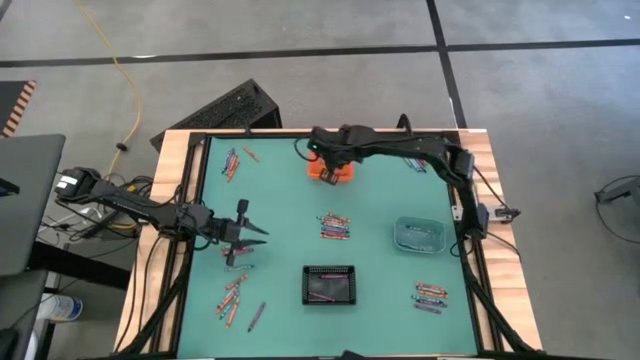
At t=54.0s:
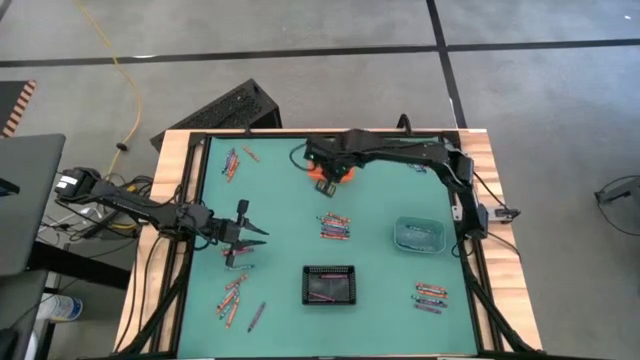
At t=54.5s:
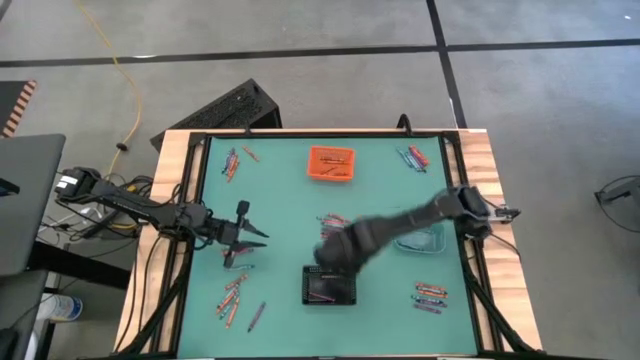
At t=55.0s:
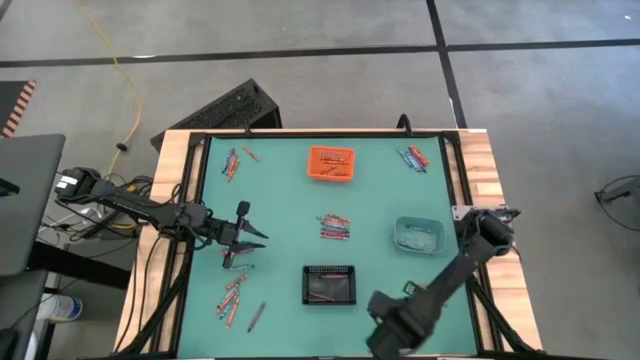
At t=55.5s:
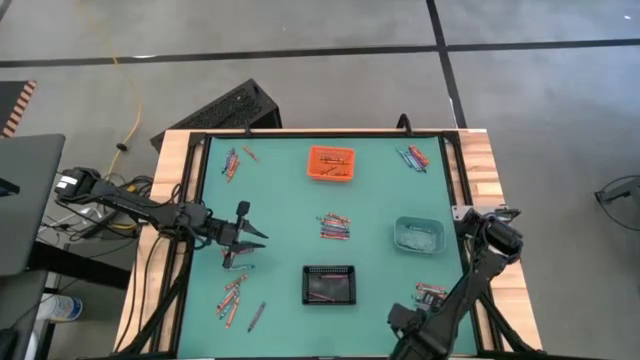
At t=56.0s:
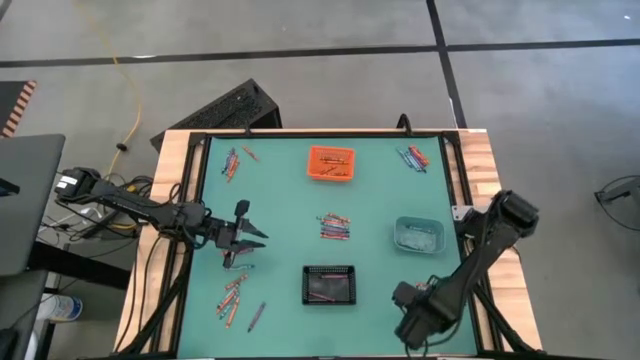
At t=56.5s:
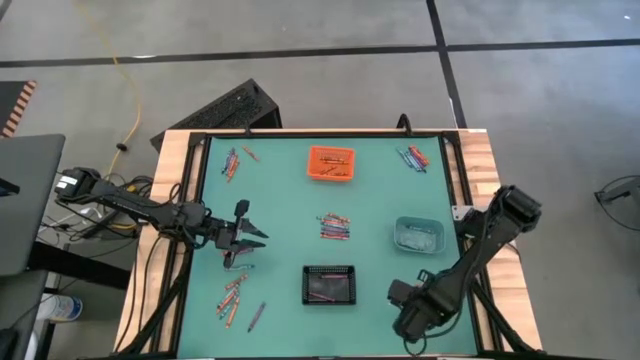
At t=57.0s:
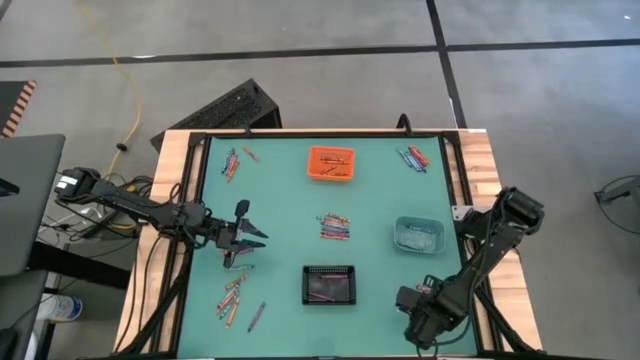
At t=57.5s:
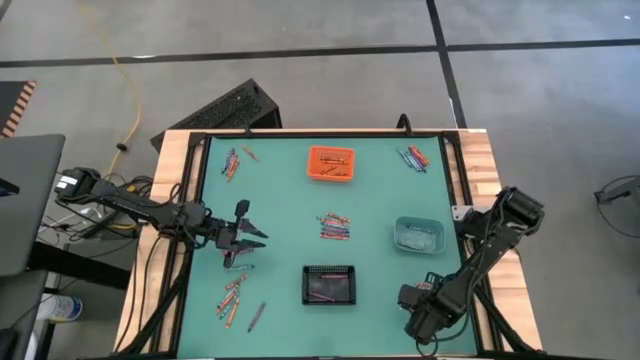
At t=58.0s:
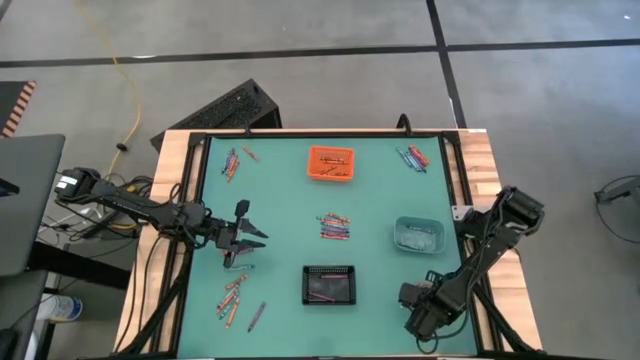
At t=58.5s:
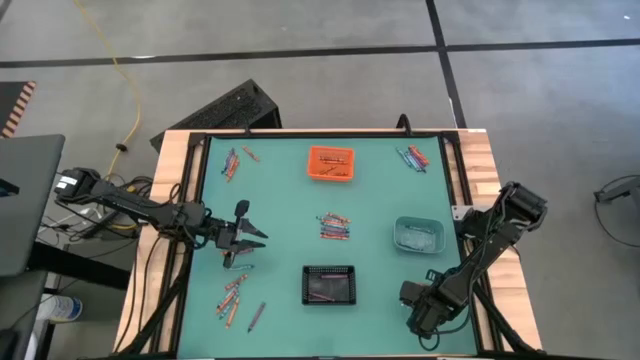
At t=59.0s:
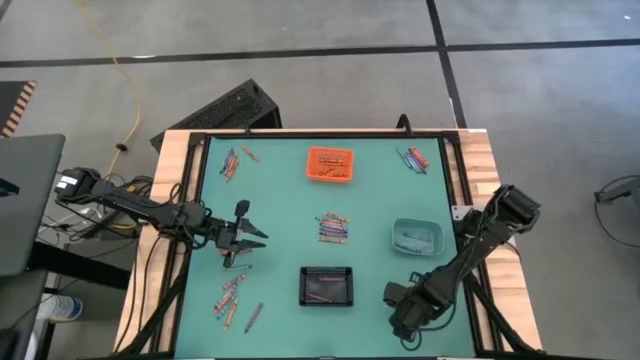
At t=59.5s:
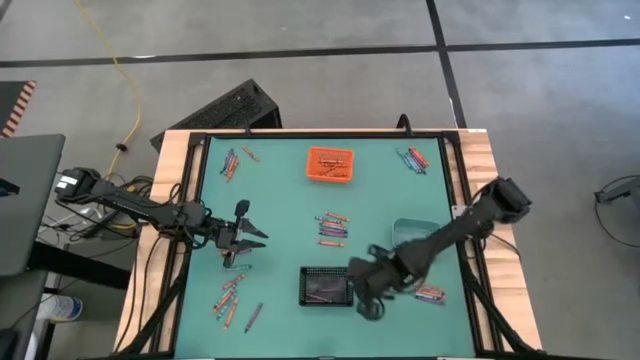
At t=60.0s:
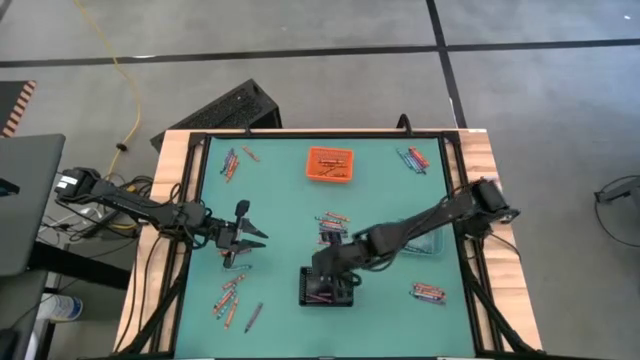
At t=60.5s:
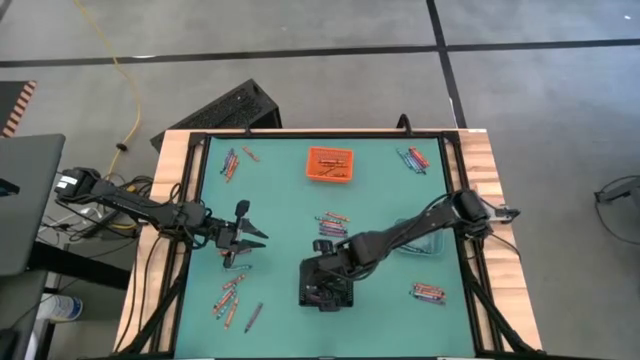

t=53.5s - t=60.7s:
Task: Sort crayons
Put the purple crayon into the black bin

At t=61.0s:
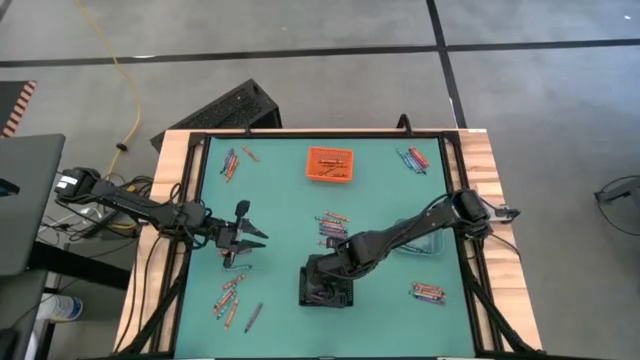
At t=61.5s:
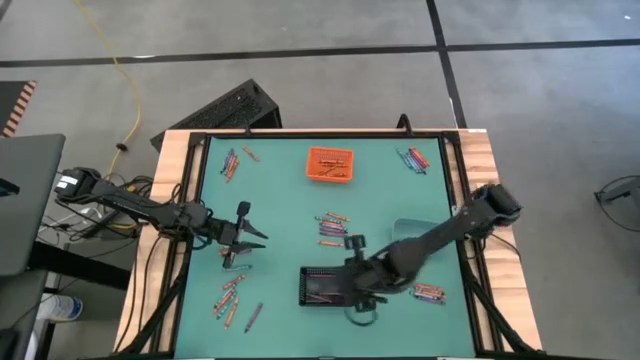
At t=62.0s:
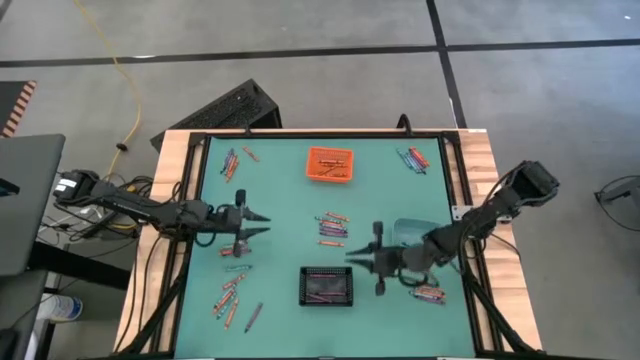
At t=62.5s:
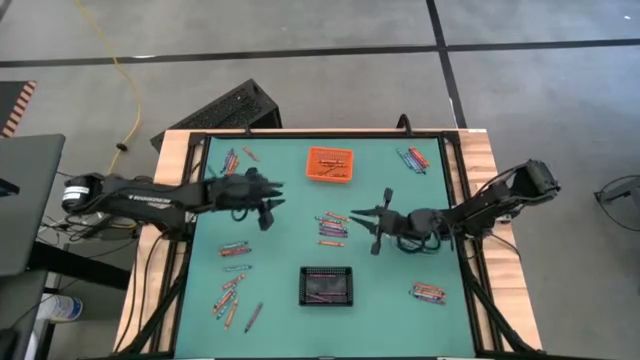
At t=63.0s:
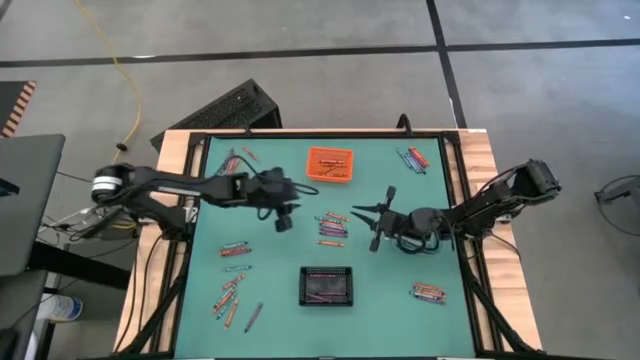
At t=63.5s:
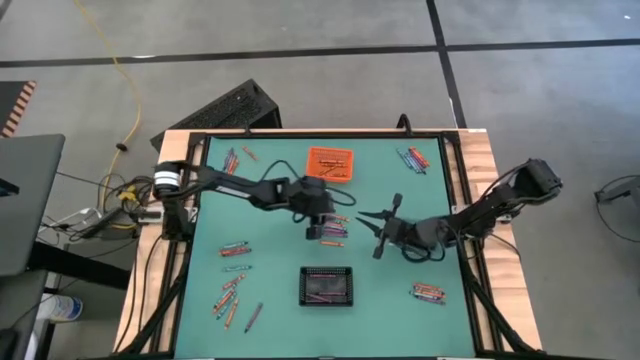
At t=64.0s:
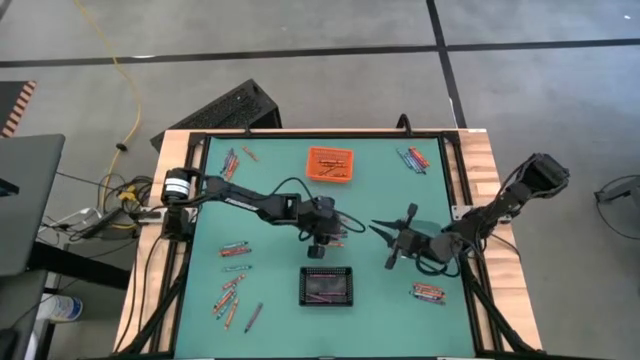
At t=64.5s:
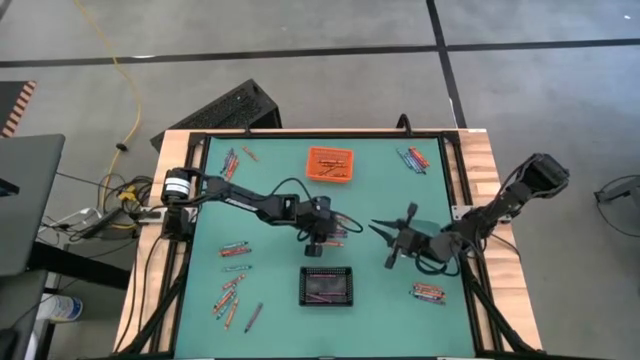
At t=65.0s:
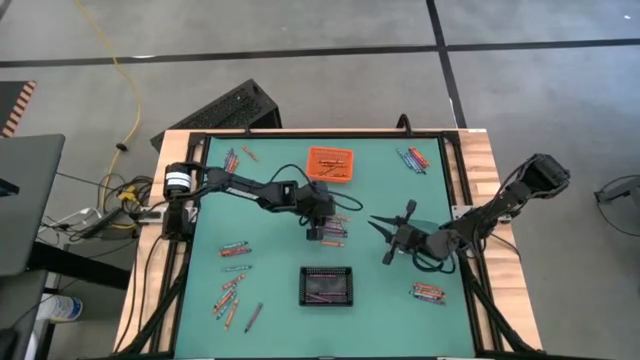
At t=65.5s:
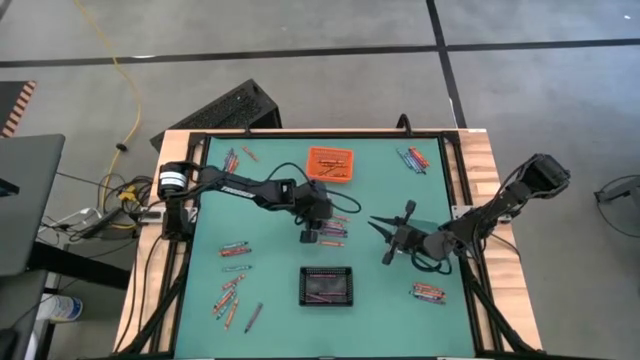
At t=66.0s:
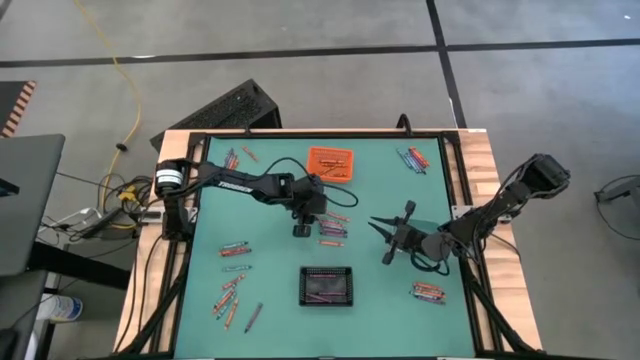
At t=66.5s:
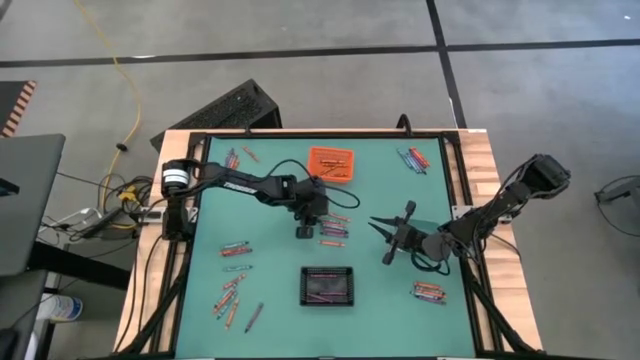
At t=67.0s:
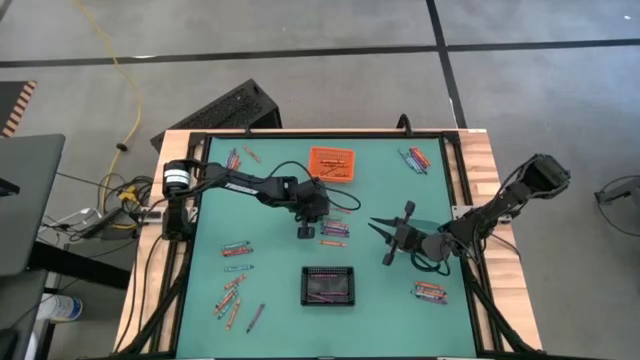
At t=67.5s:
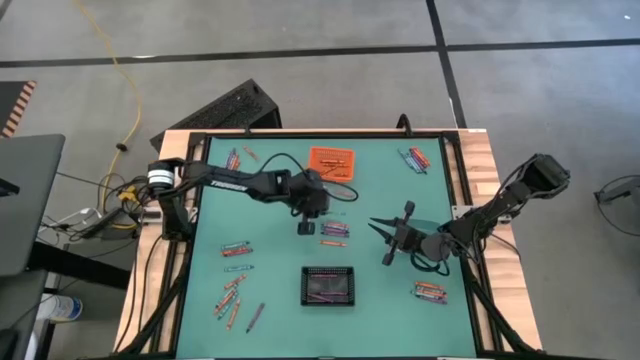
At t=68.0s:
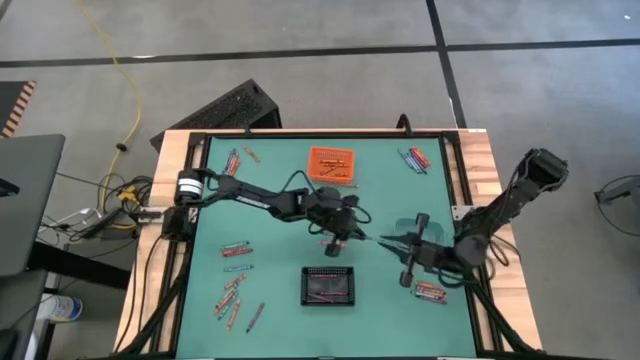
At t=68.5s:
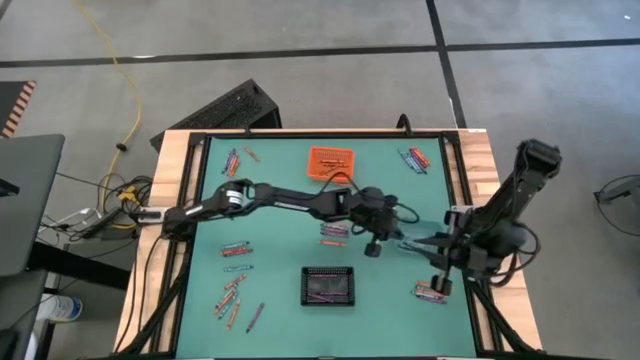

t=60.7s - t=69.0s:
Put the blue crayon into the blue bin

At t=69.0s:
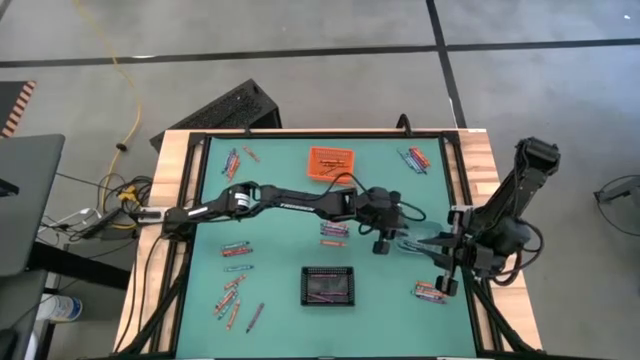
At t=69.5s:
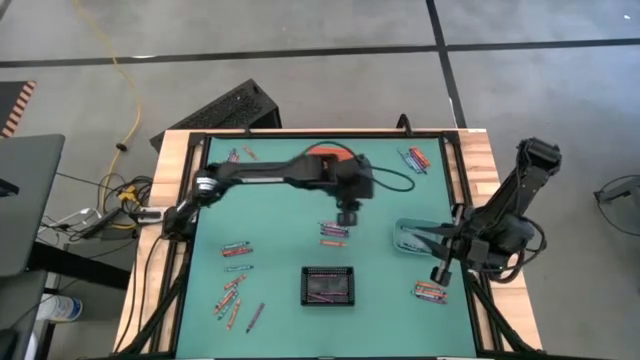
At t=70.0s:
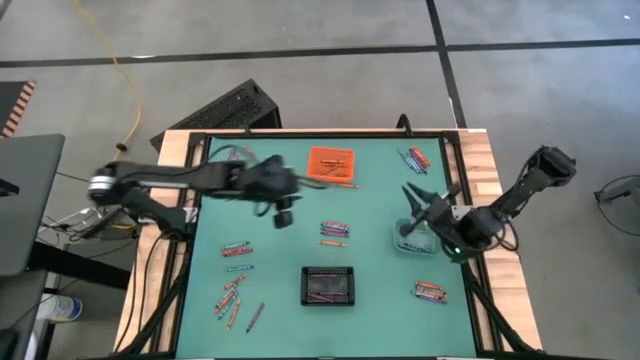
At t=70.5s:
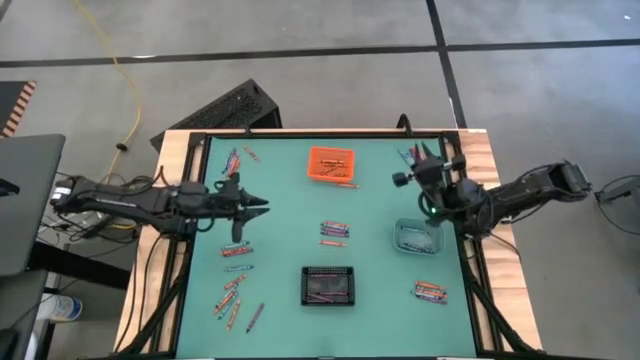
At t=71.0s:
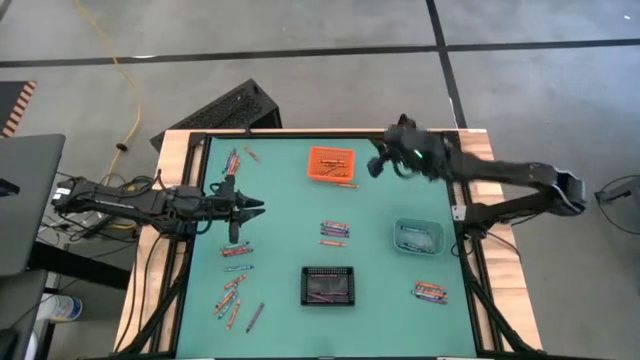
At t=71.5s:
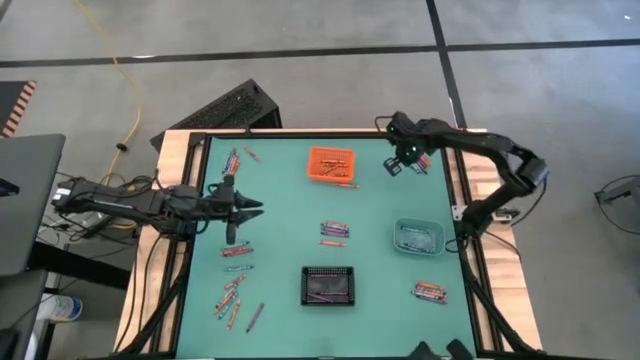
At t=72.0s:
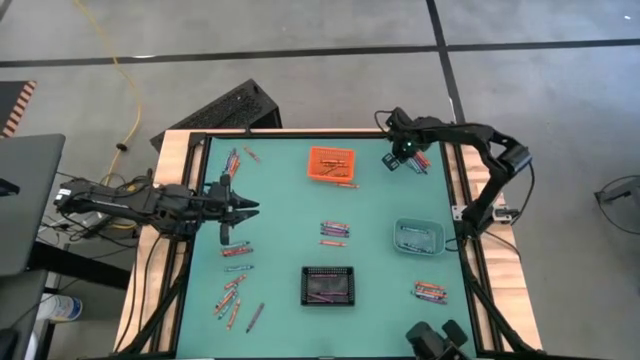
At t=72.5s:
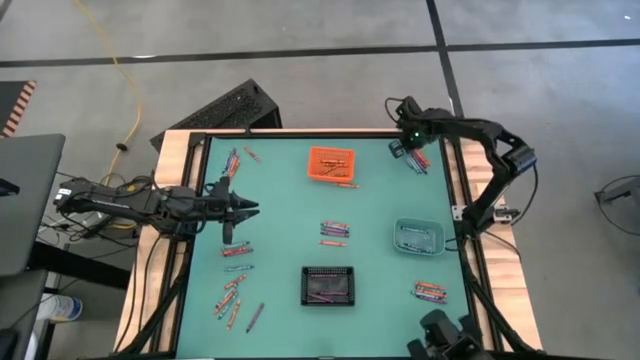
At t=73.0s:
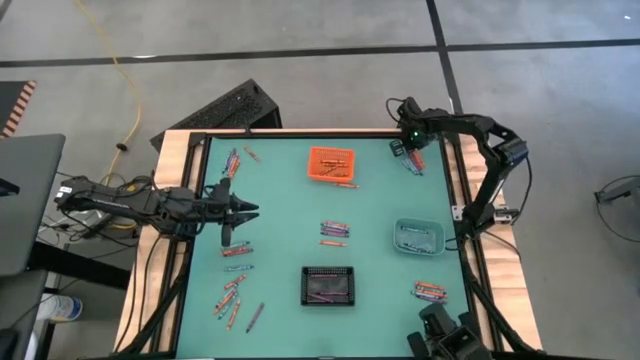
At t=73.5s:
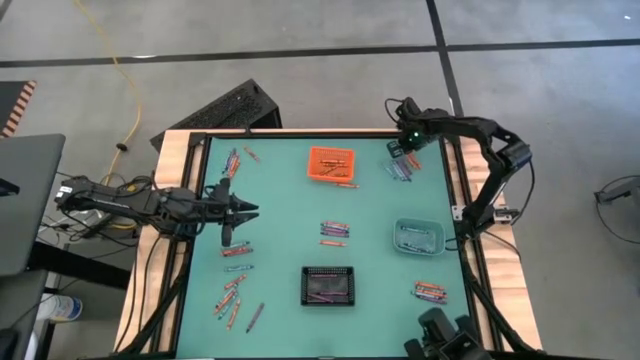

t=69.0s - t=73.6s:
Put the orange crayon into the orange bin
